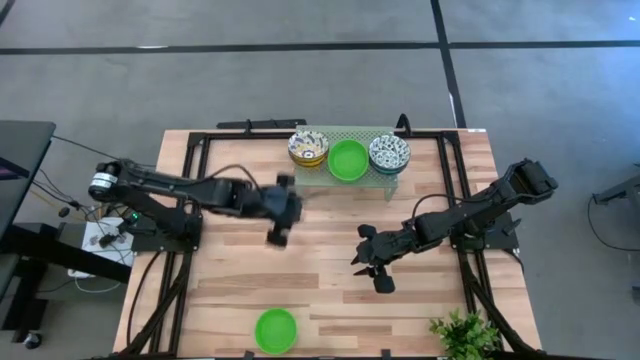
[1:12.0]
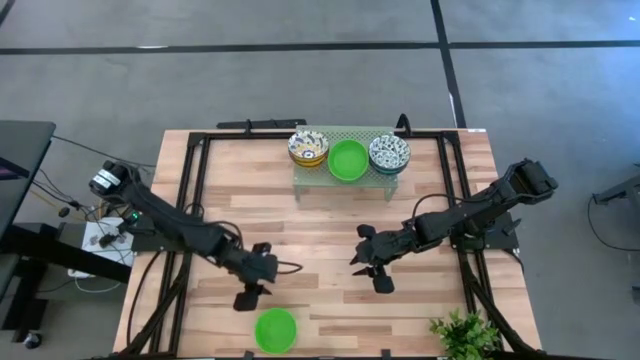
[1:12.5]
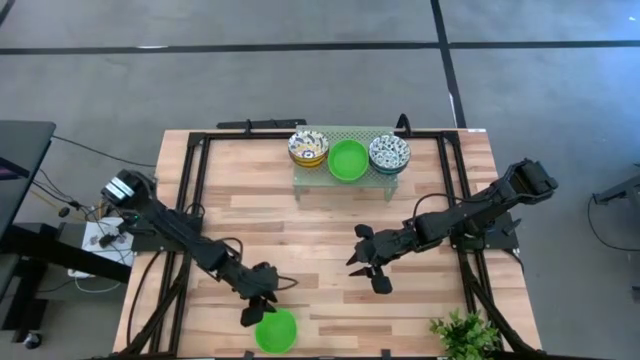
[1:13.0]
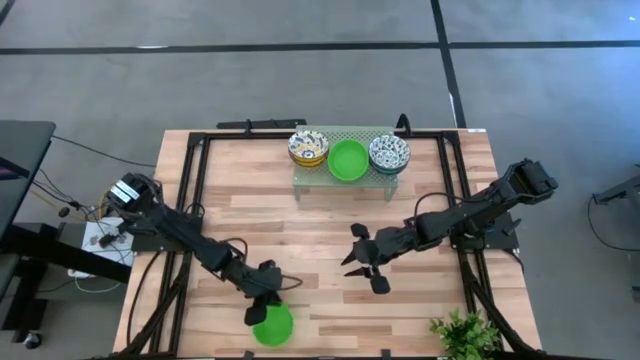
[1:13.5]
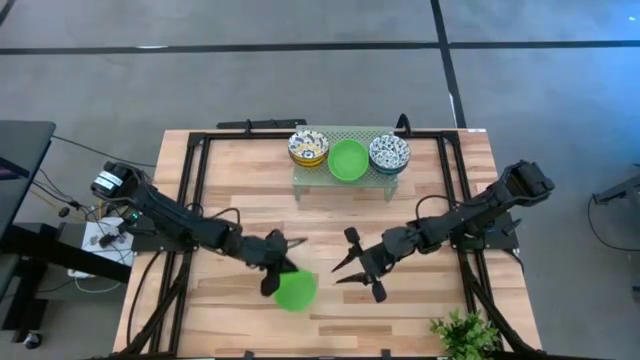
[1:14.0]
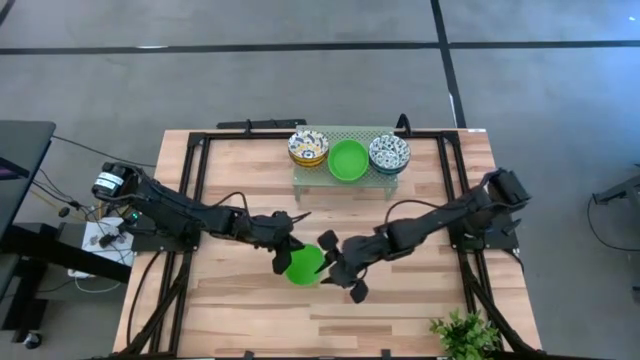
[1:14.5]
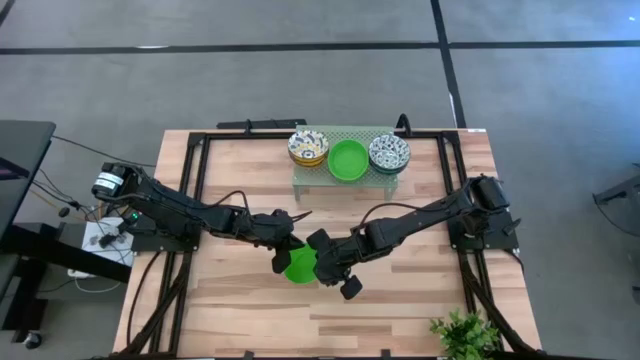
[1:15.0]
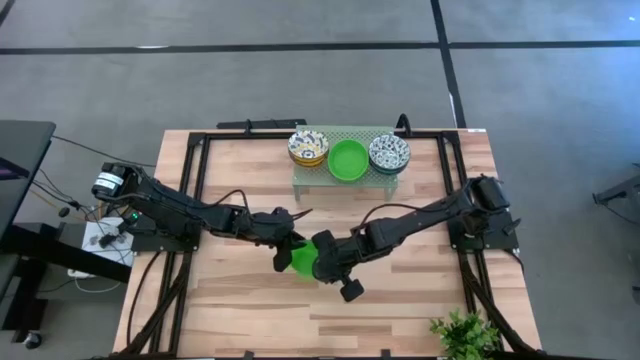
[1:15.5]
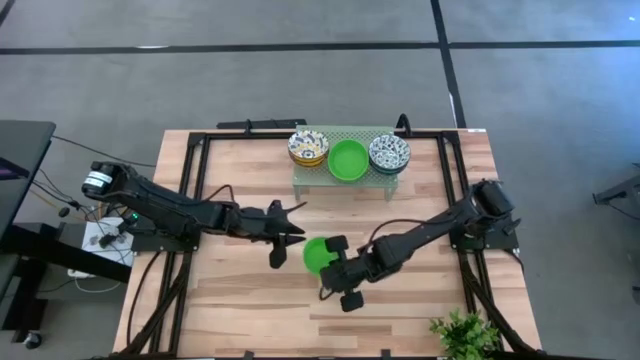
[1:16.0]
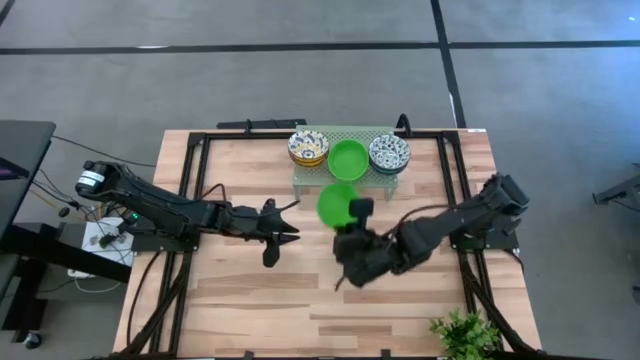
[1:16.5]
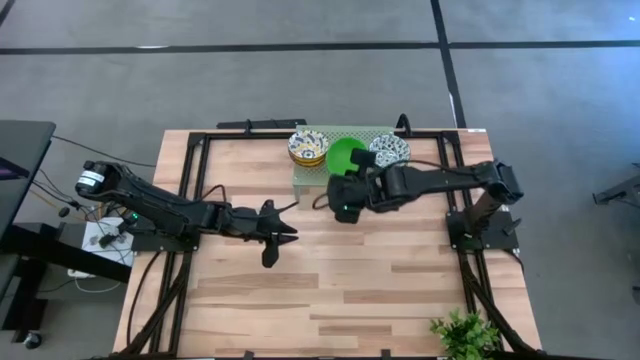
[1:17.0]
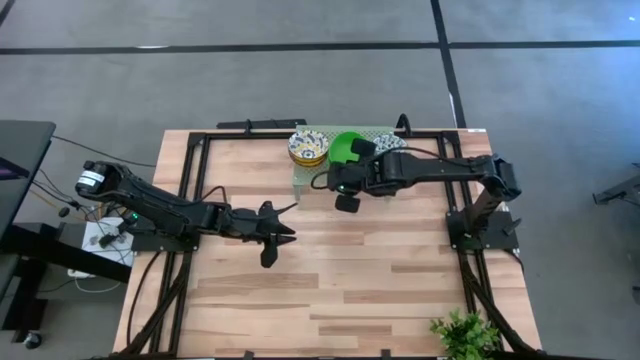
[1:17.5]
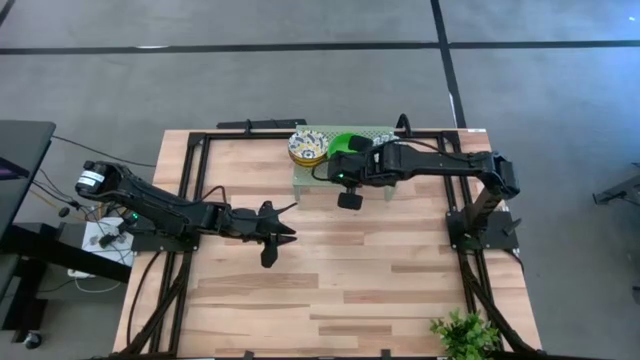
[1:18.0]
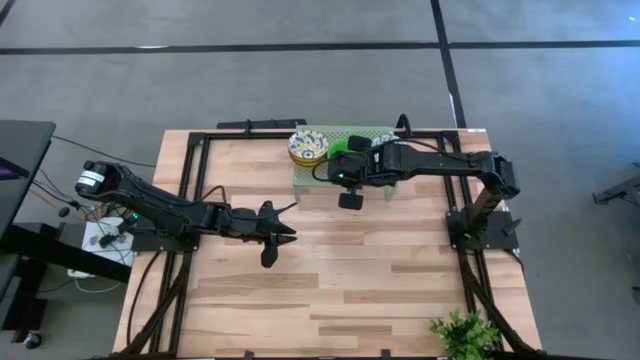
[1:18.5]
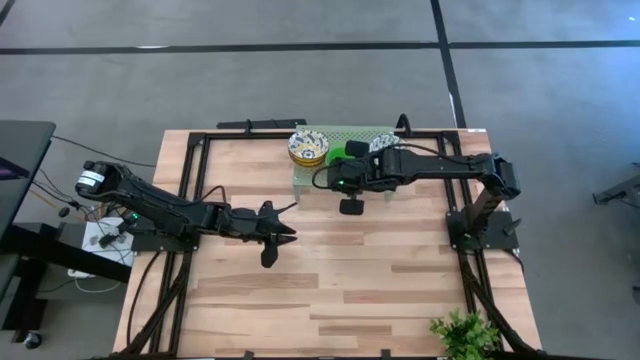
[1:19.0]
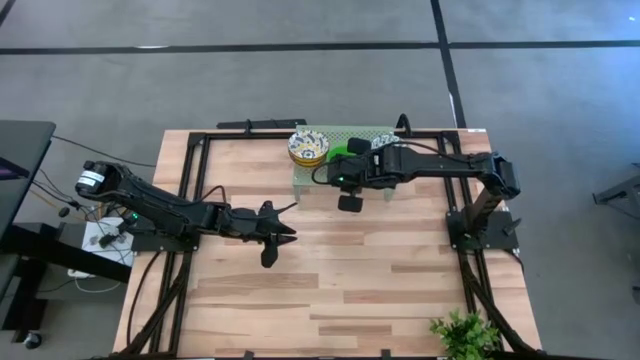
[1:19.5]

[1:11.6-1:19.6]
Task: Pick & Place Mini bowls
Stack the green bowl on the green bowl on the shelf

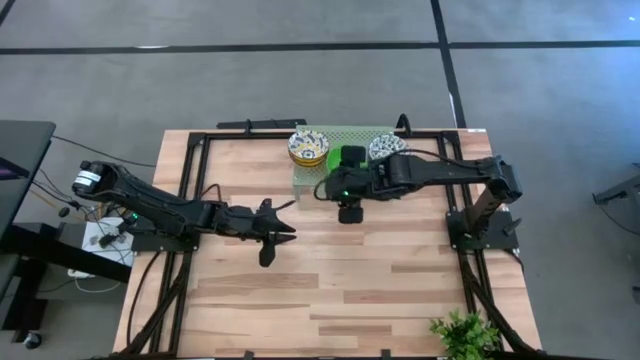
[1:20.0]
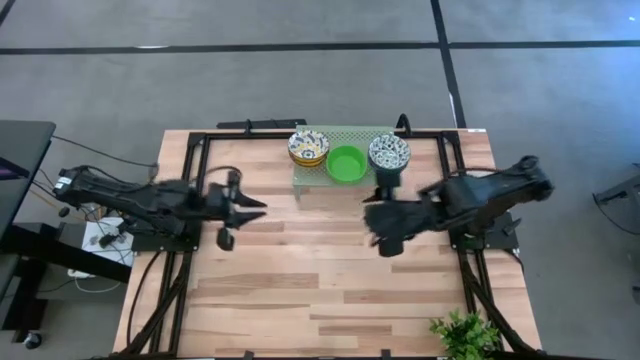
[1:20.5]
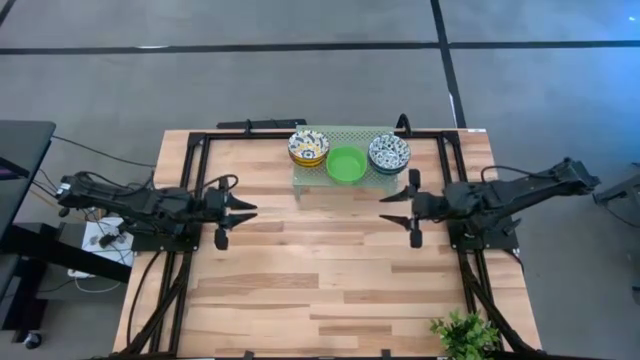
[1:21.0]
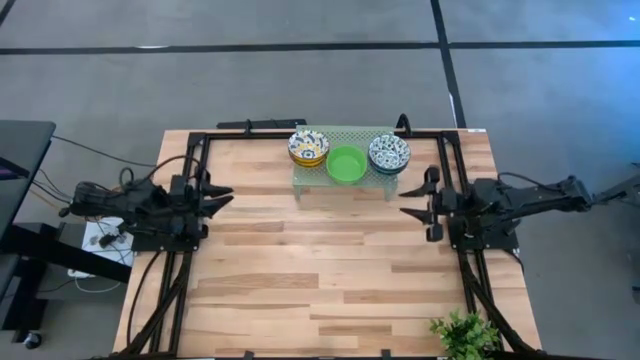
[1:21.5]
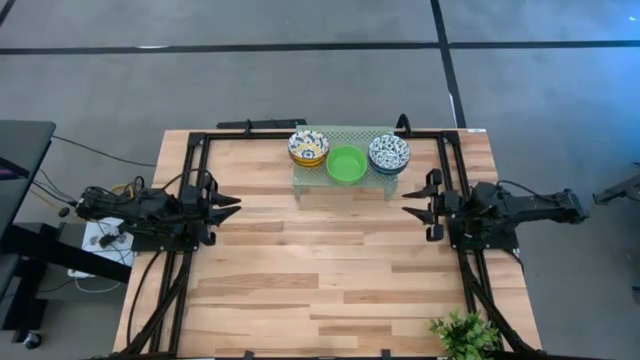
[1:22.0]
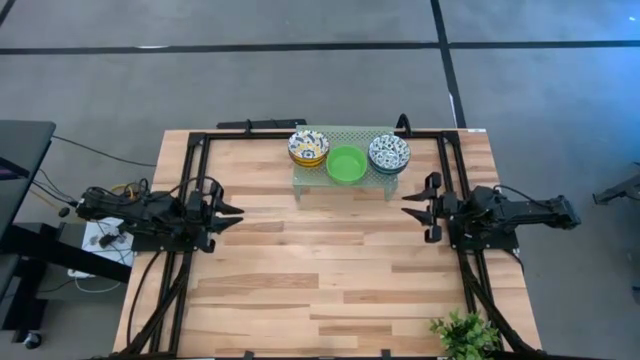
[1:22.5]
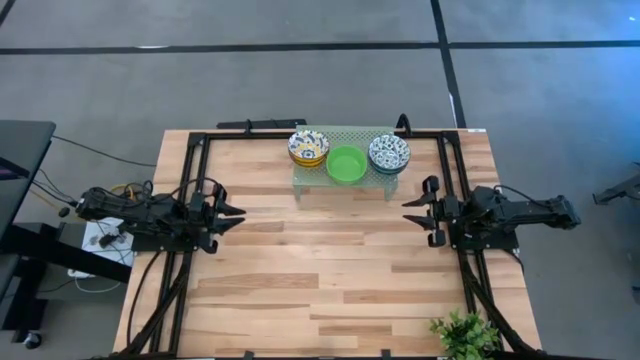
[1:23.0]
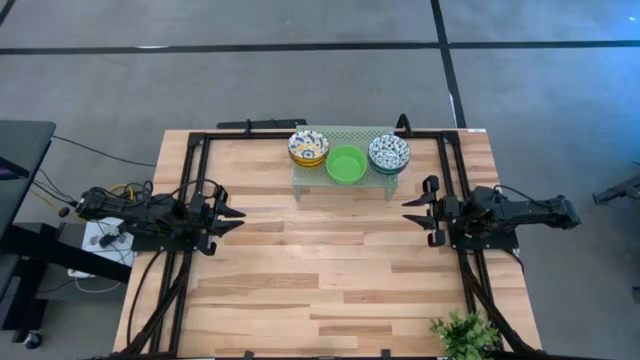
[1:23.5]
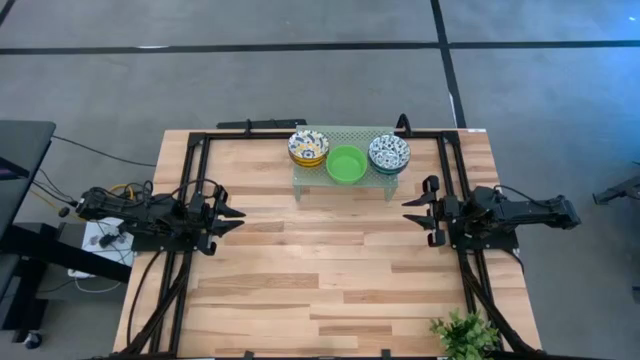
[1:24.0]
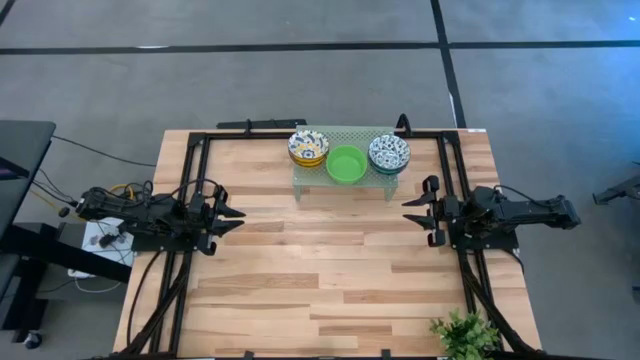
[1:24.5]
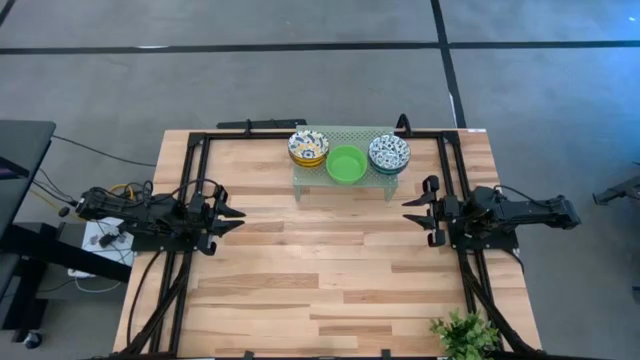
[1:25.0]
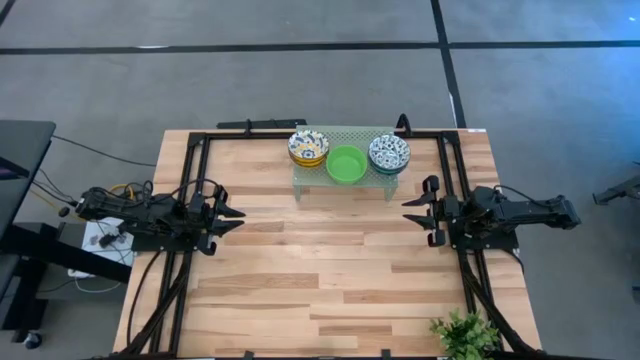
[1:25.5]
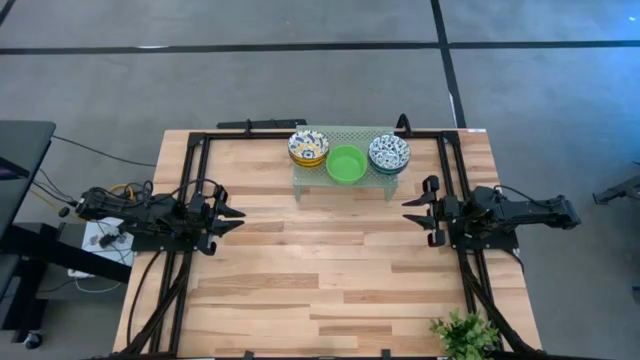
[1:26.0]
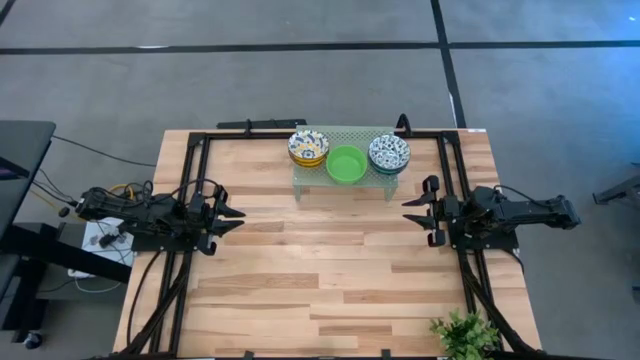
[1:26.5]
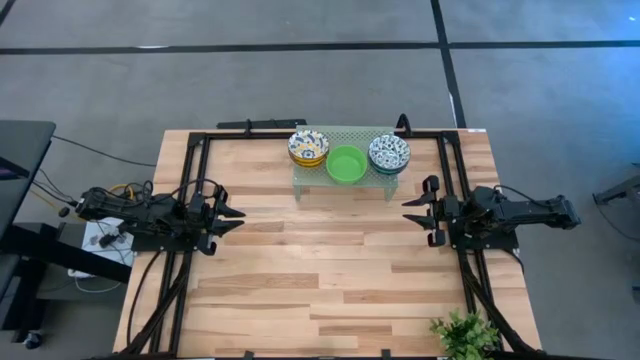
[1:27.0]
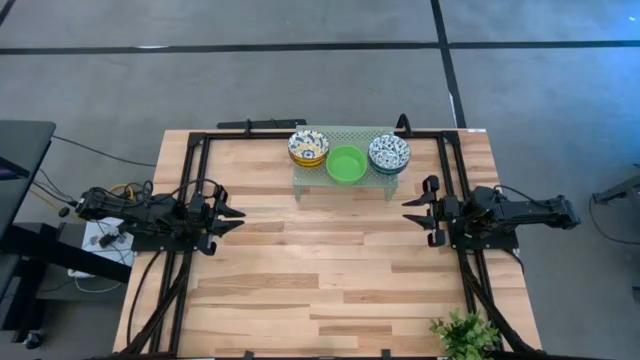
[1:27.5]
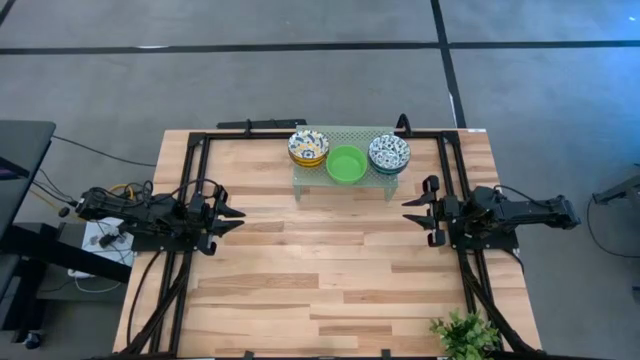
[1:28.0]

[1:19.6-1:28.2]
Return to Home Position

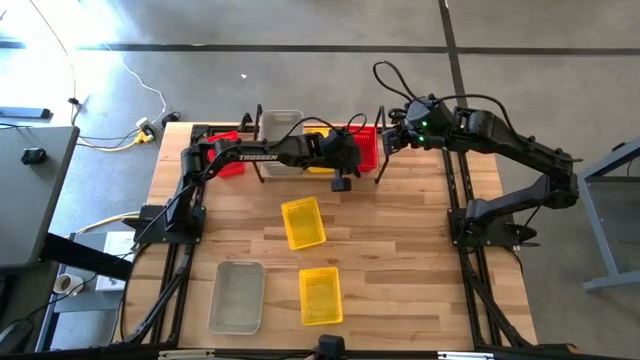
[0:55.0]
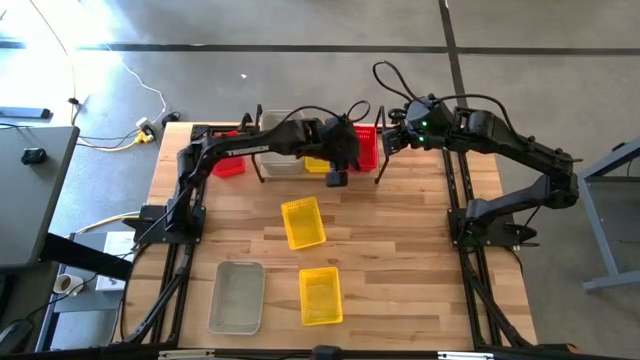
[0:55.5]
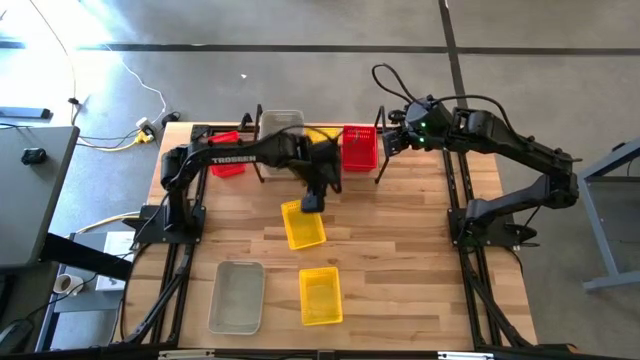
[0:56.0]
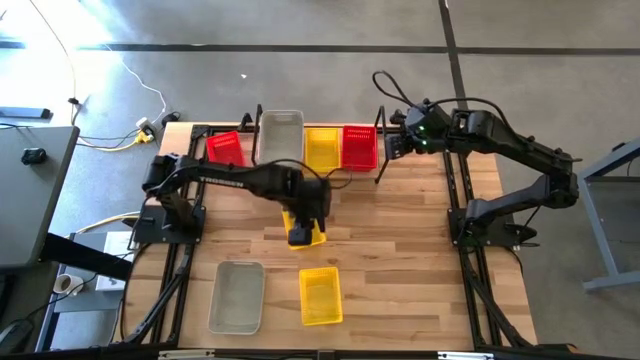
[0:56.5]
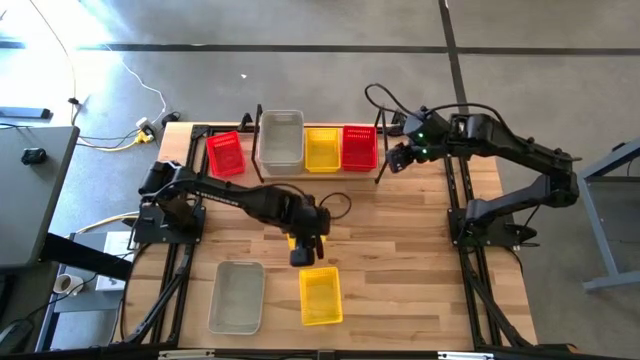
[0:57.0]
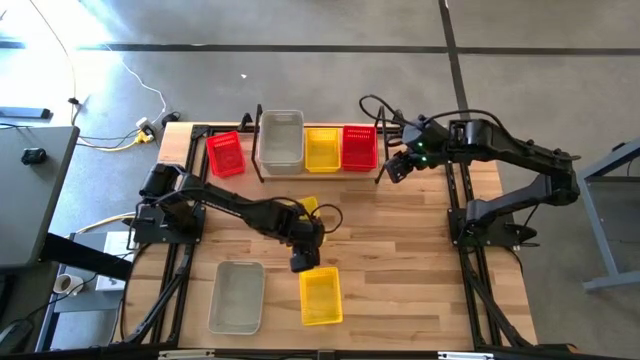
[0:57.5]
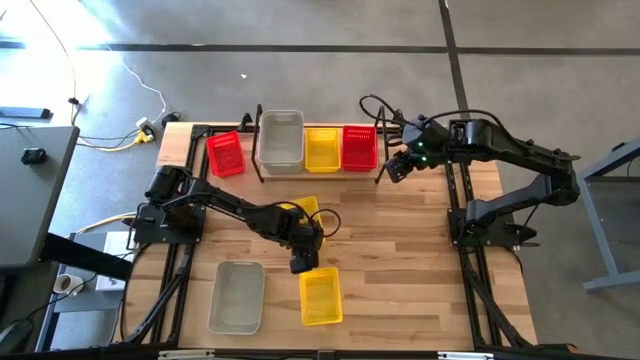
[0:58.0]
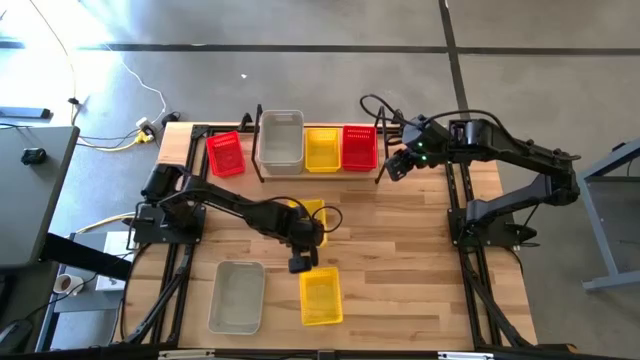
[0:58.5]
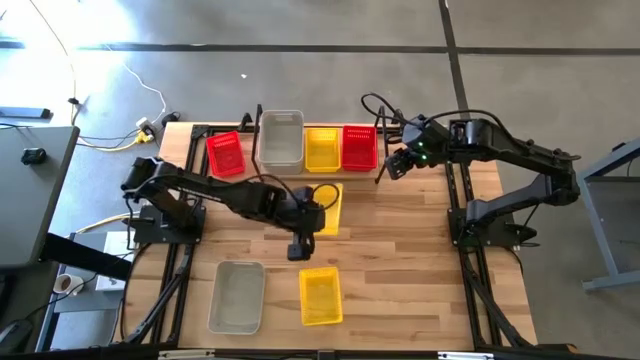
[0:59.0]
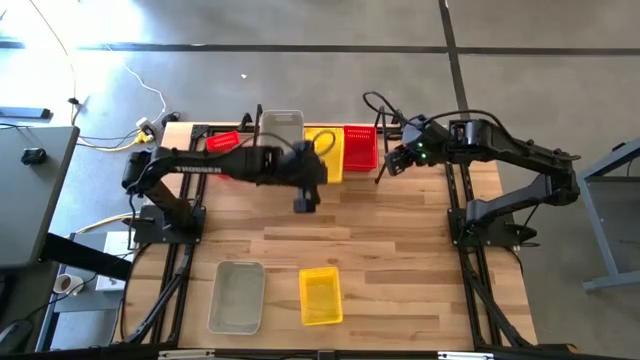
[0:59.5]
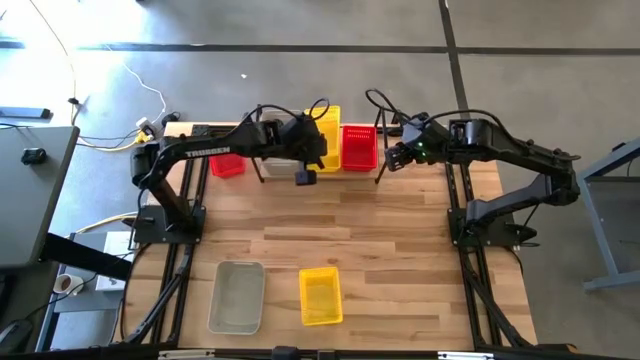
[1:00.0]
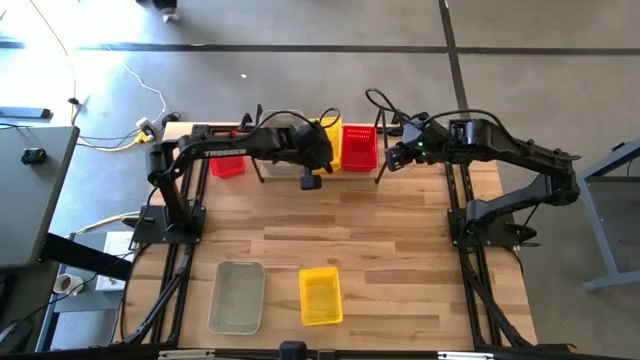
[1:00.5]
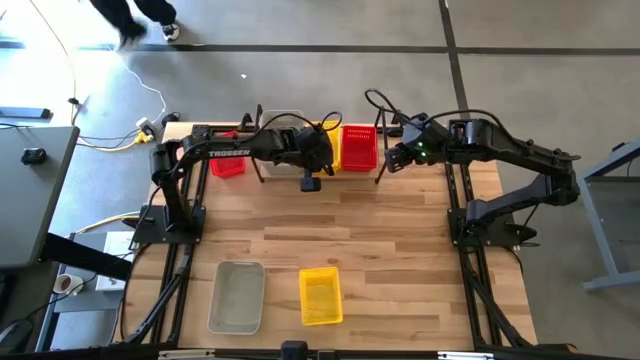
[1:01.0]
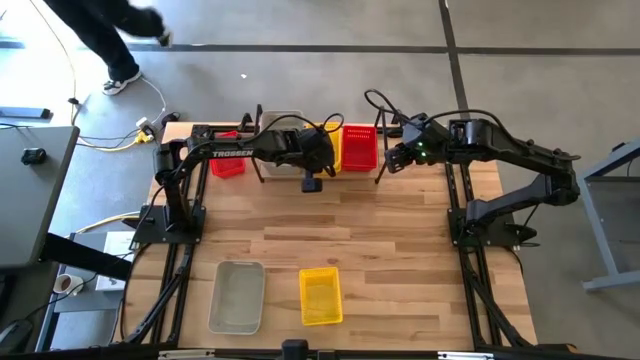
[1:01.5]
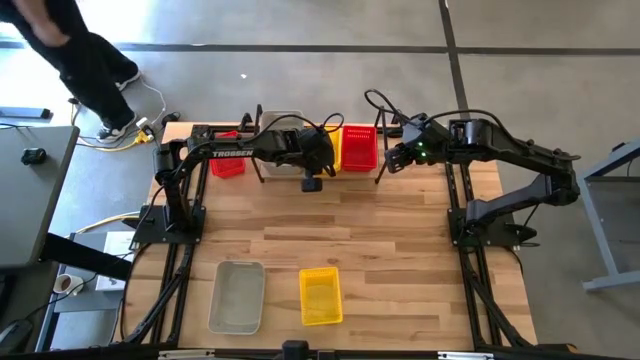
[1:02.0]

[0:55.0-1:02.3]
Task: Stack baskets on shelf by color
Stack the top yellow bin on the yellow bin on the shelf
